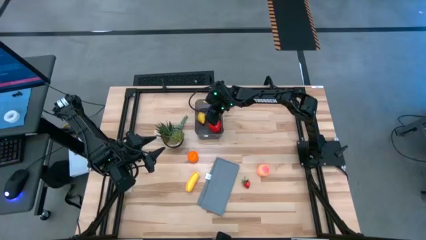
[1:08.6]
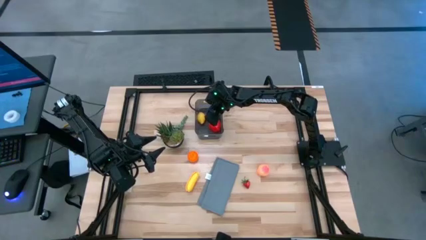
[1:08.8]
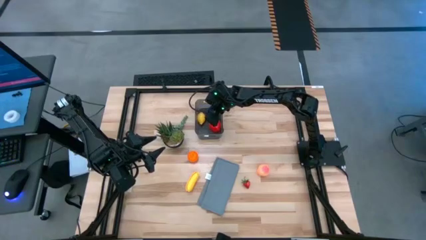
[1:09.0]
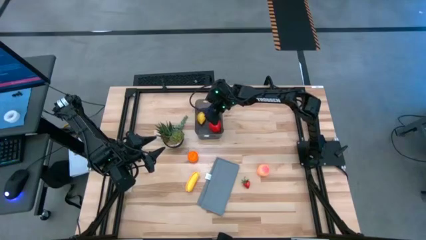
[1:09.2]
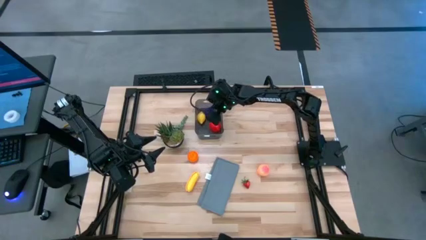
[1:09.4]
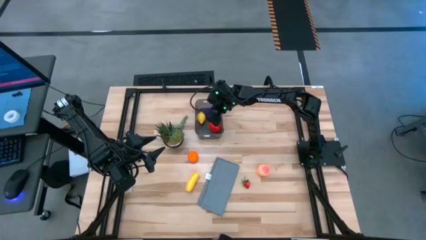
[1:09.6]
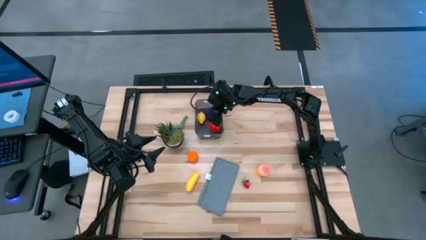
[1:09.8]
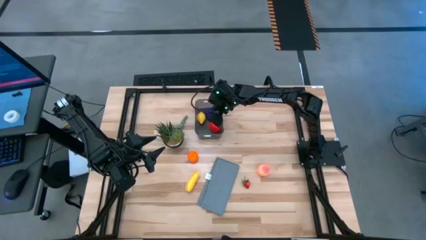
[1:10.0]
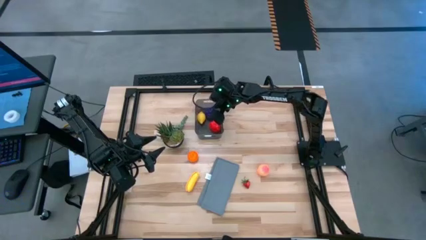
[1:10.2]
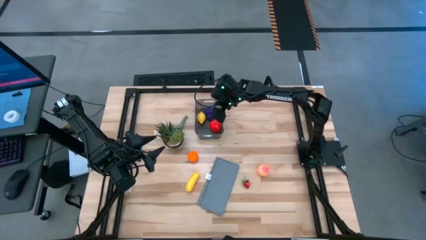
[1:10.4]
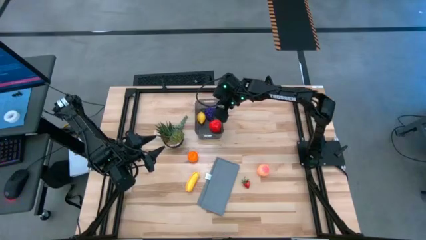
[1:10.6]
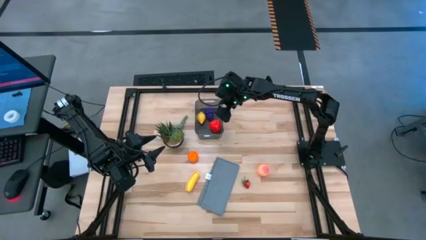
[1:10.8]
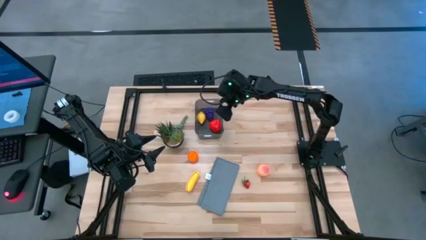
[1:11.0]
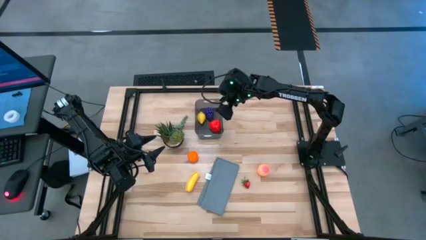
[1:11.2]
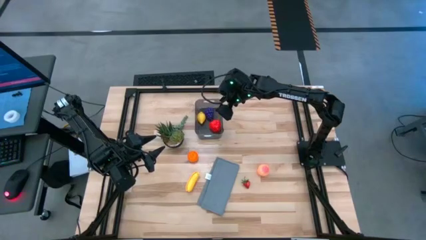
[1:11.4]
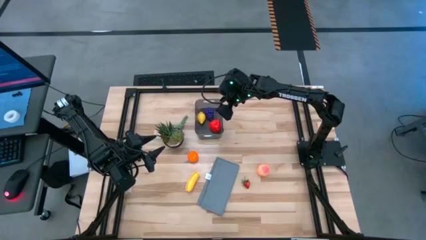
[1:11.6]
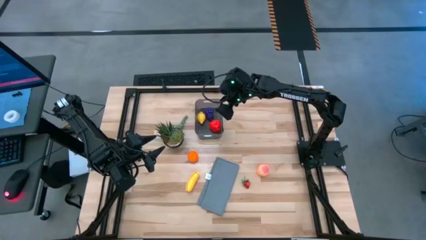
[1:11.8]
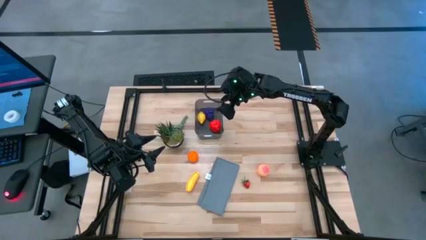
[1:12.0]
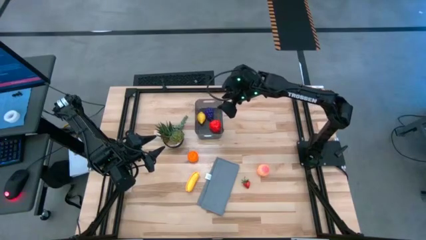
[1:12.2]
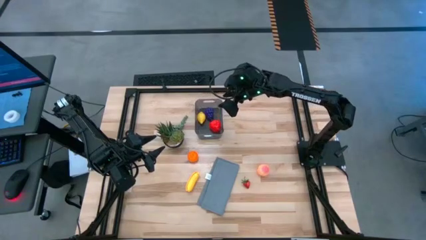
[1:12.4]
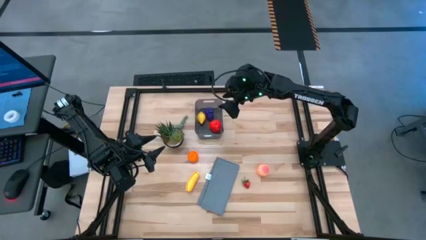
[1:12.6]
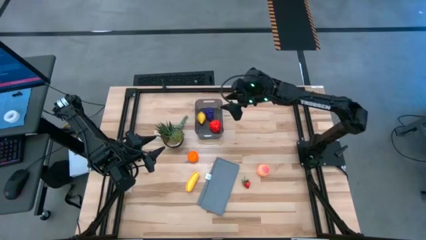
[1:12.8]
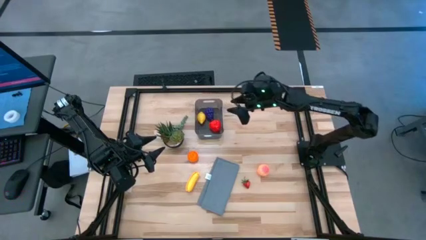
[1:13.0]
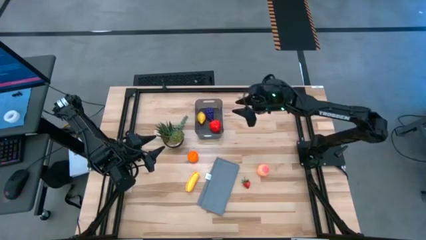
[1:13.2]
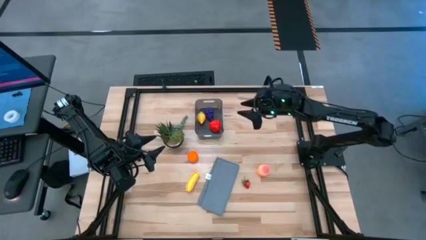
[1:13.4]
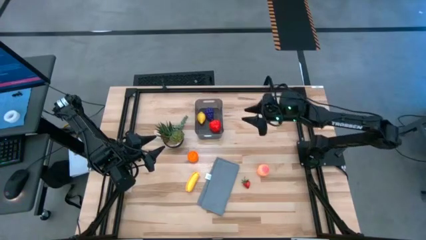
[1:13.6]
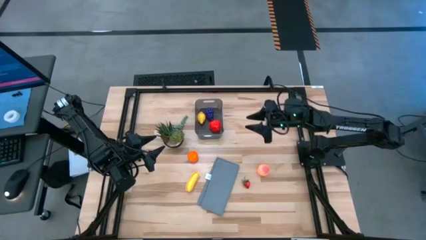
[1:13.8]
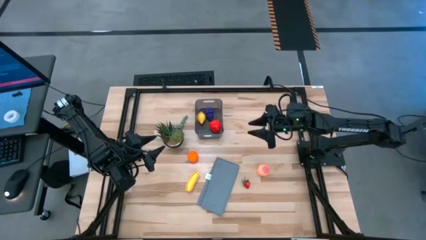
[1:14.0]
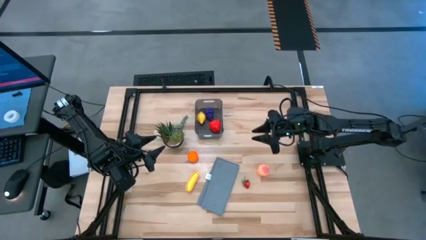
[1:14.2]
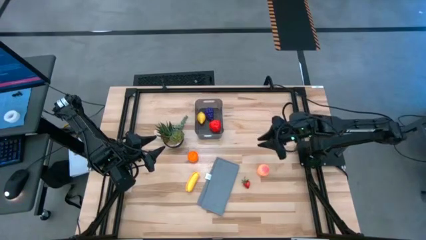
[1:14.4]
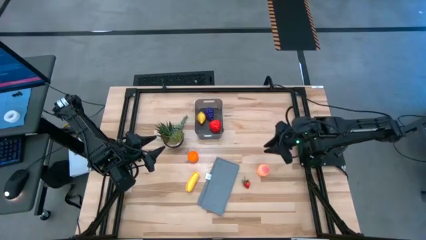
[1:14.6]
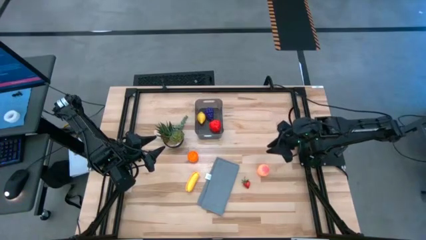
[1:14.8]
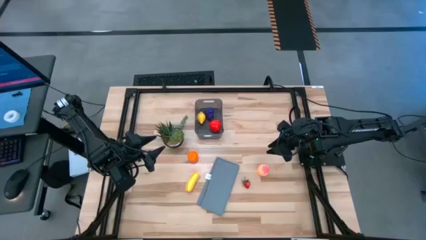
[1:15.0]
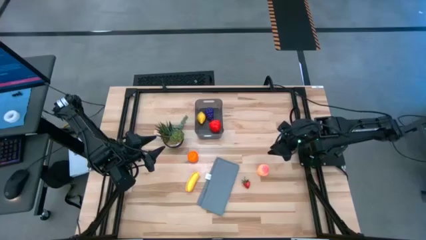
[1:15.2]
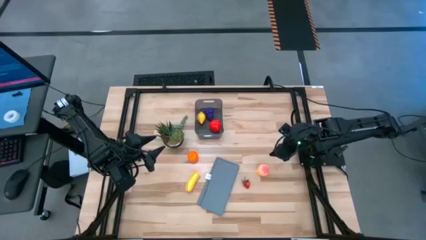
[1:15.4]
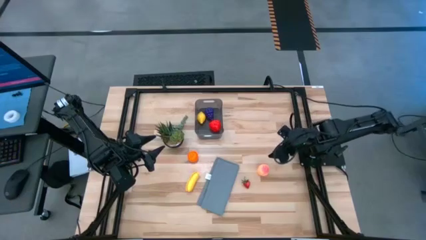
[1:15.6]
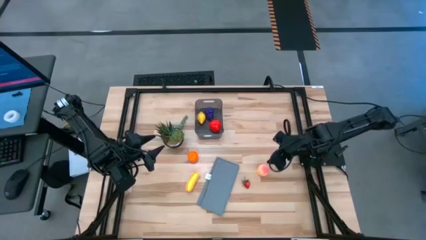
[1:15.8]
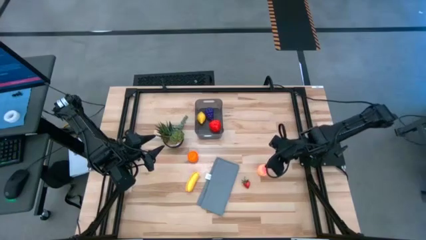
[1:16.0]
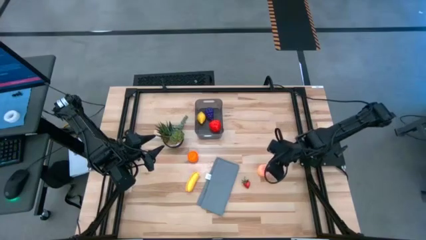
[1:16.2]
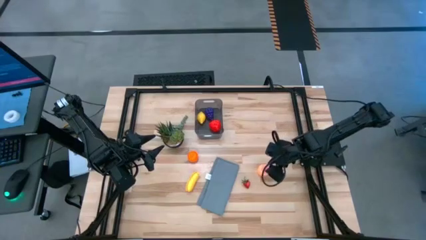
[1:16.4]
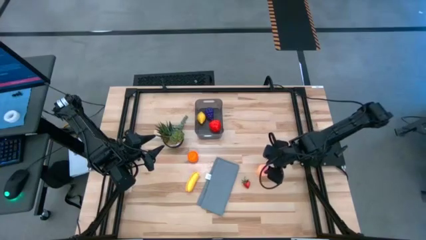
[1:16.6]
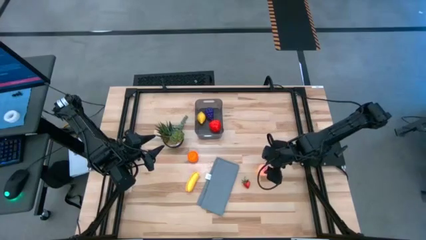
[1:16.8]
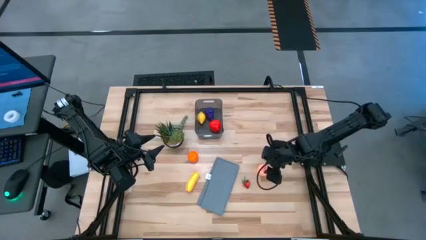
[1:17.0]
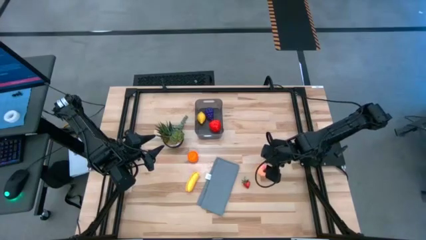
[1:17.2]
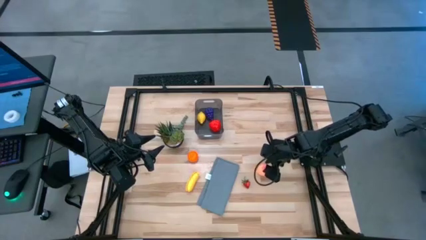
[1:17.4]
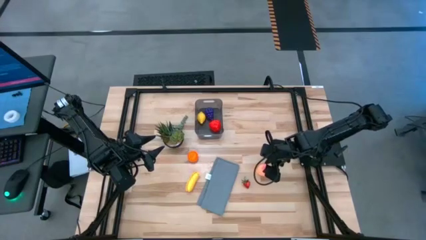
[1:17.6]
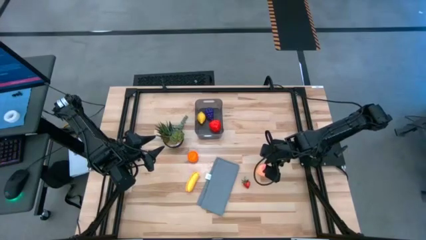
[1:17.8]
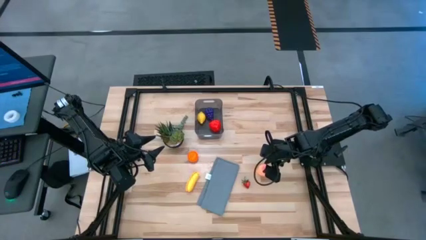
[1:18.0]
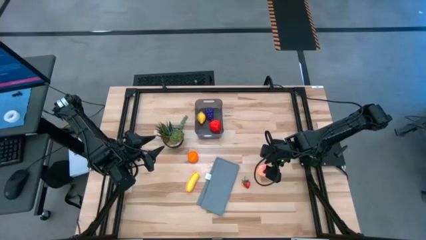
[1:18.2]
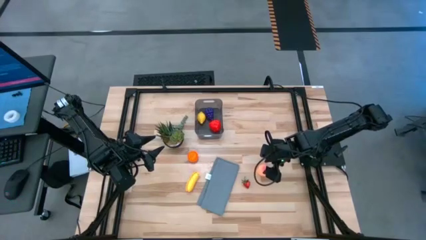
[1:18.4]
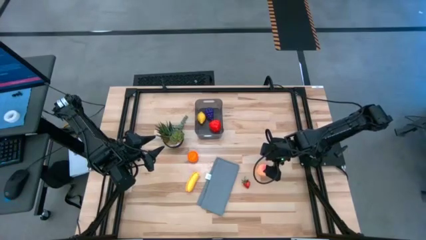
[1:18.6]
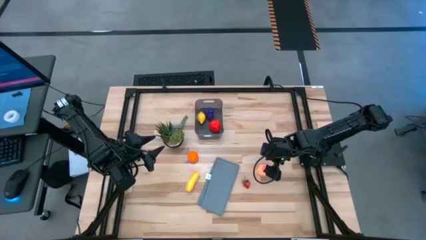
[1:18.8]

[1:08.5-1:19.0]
Task: Pick and placing Produce into tupperware
Put the pink peach into the black bin
